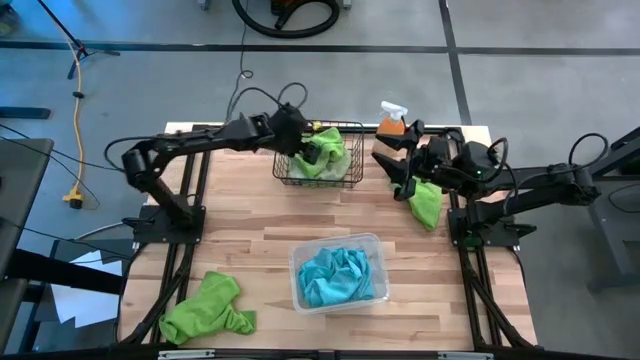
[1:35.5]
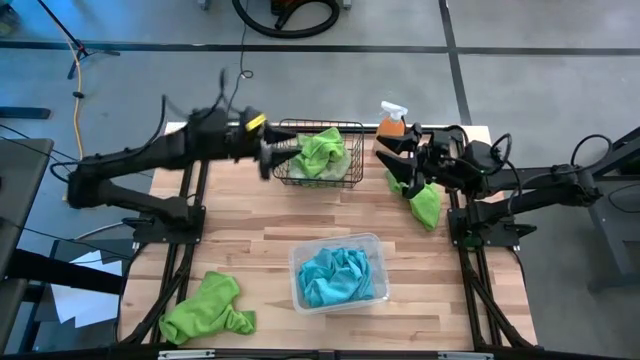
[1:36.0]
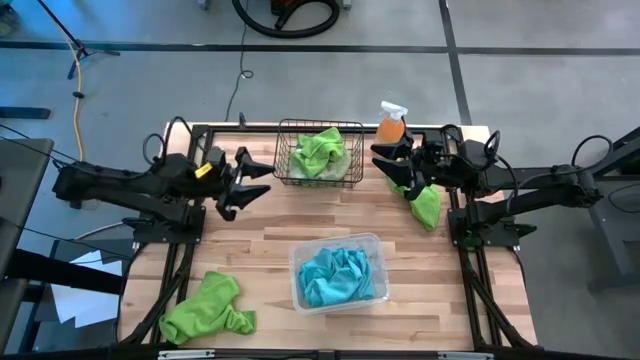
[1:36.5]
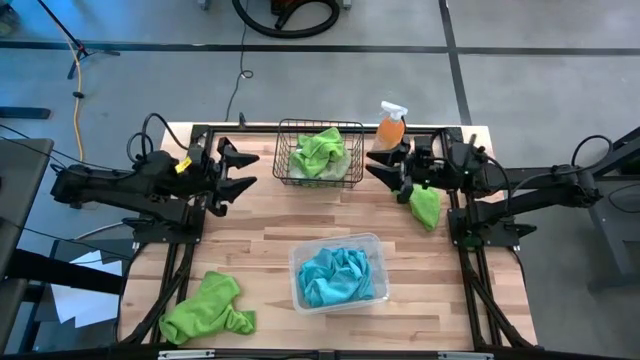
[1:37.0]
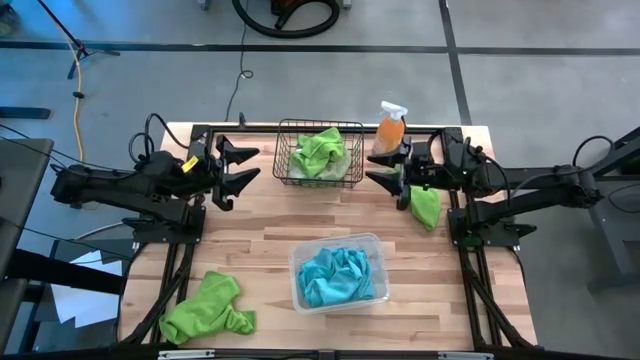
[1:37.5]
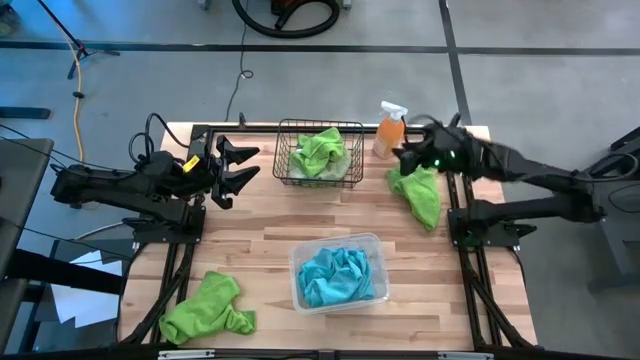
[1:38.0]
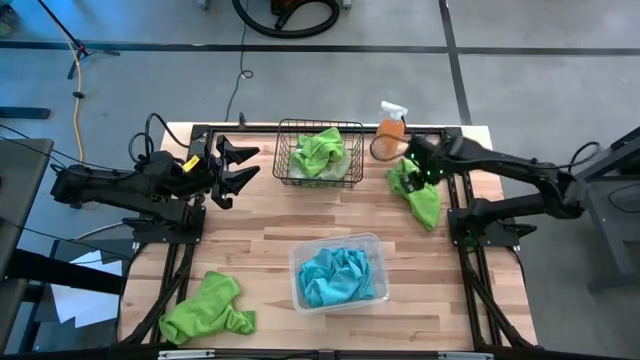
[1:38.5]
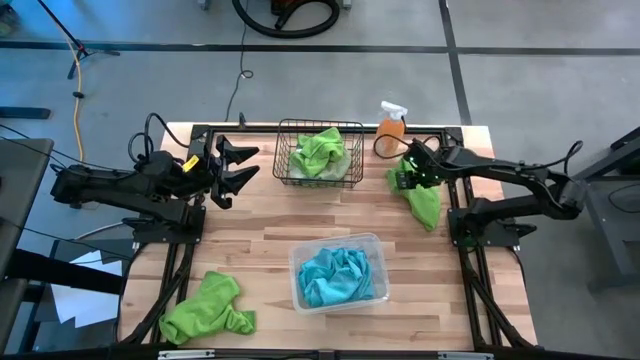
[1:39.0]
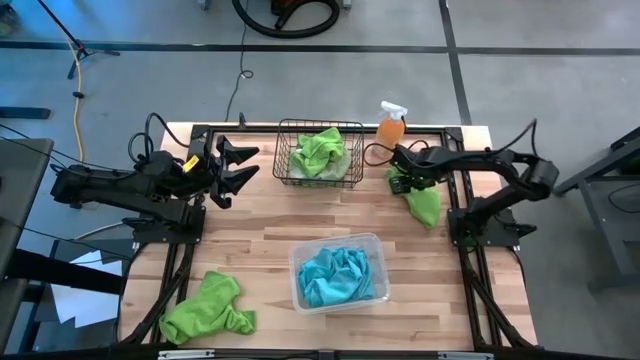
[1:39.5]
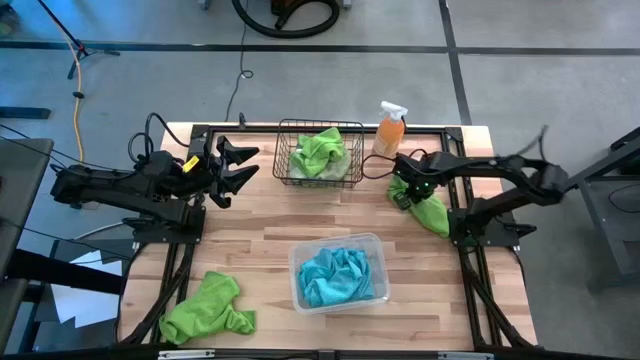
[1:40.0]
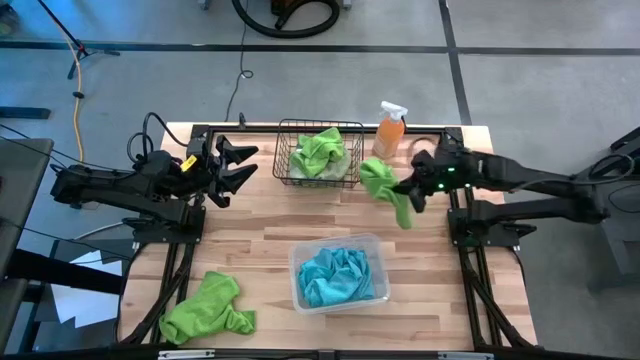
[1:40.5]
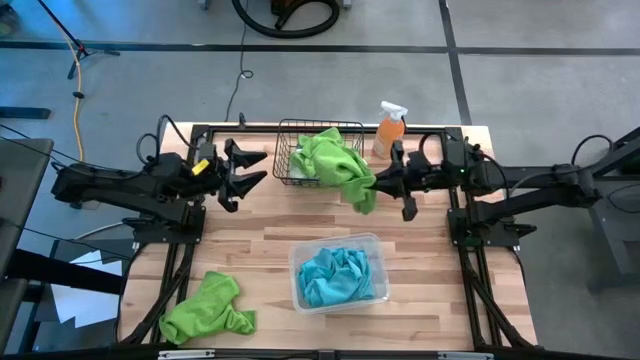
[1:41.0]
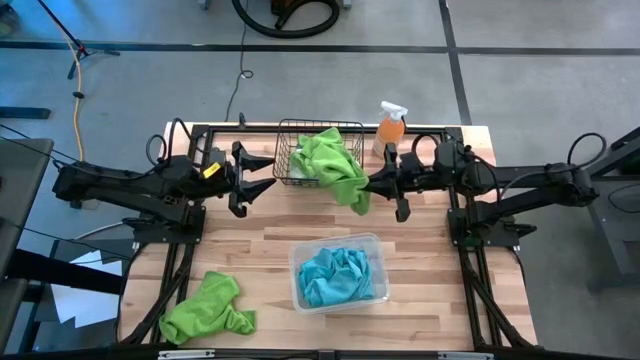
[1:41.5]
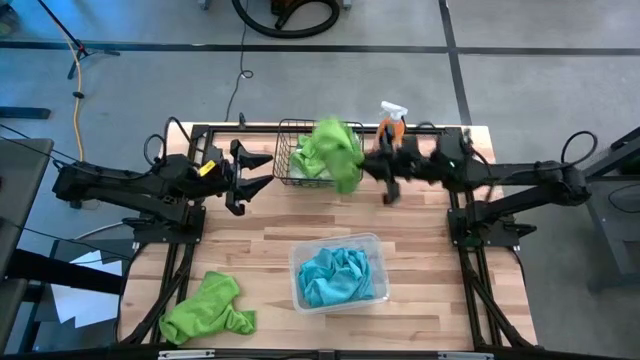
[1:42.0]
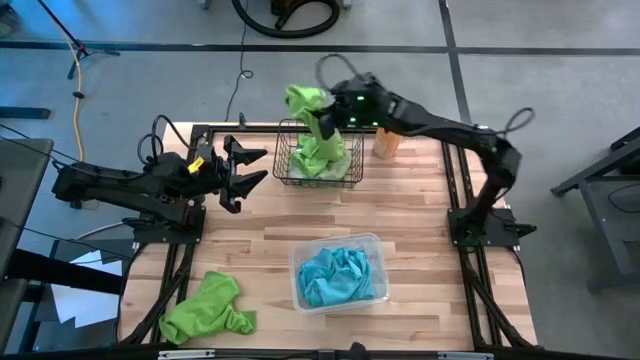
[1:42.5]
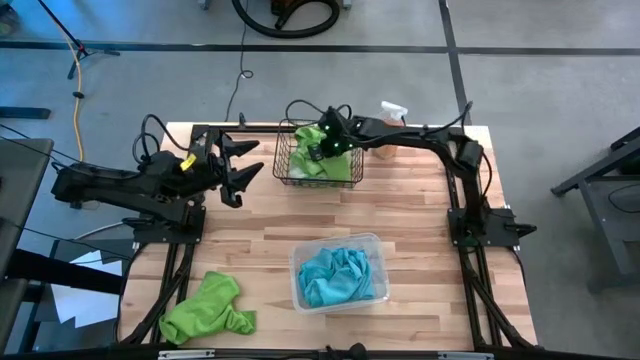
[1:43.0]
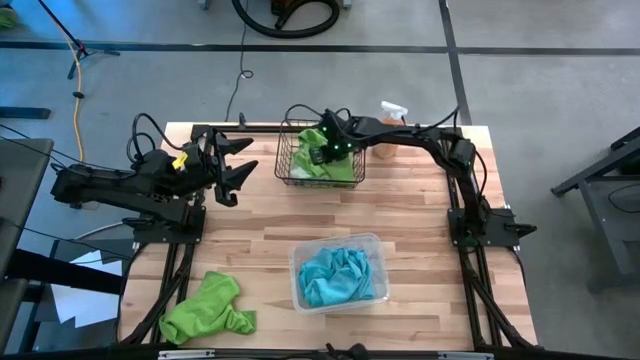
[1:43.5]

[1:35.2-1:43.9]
Task: Sort microfiber towel by color & place in baskets
Put the top green towel into the wire basket

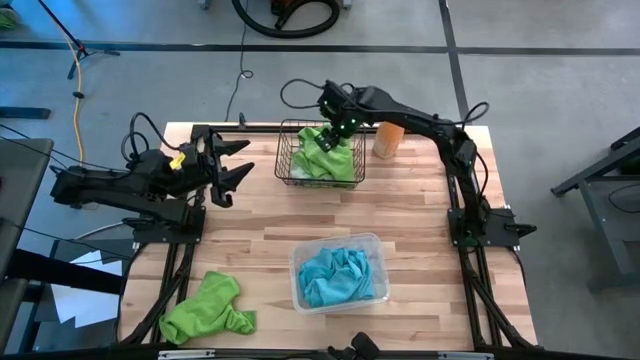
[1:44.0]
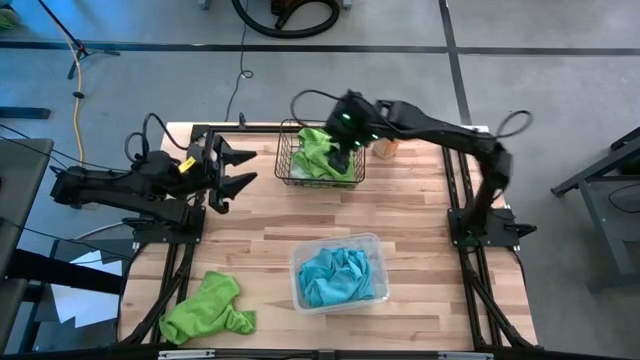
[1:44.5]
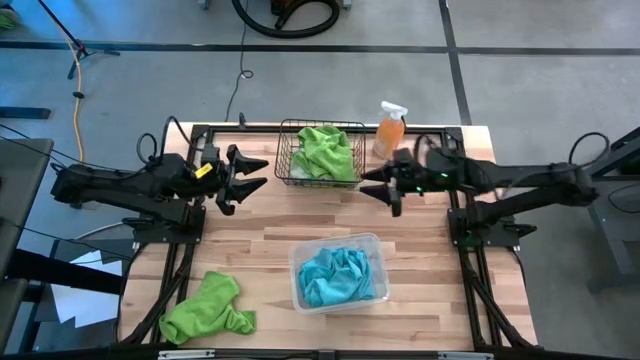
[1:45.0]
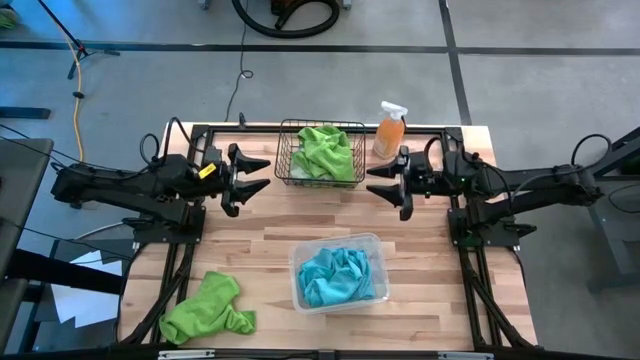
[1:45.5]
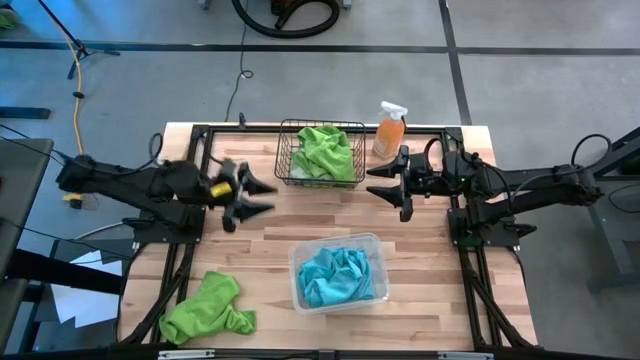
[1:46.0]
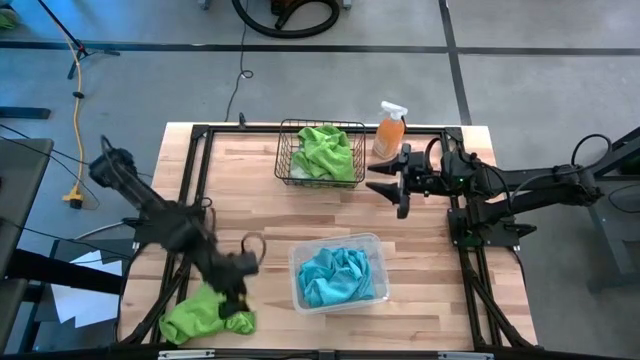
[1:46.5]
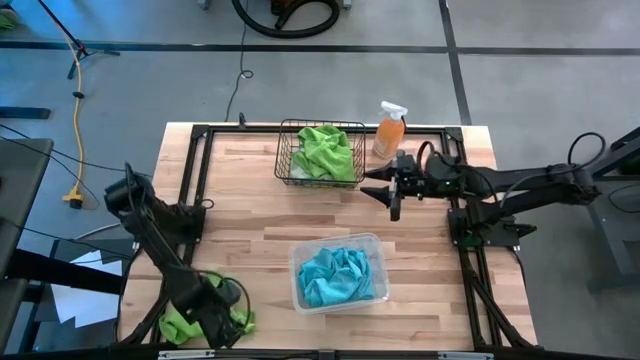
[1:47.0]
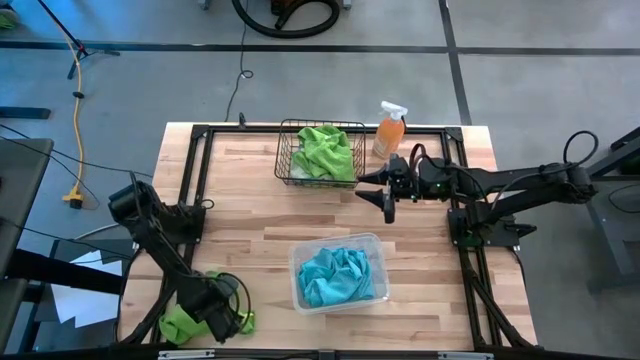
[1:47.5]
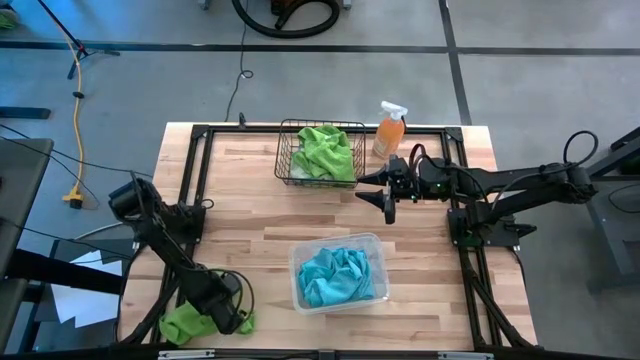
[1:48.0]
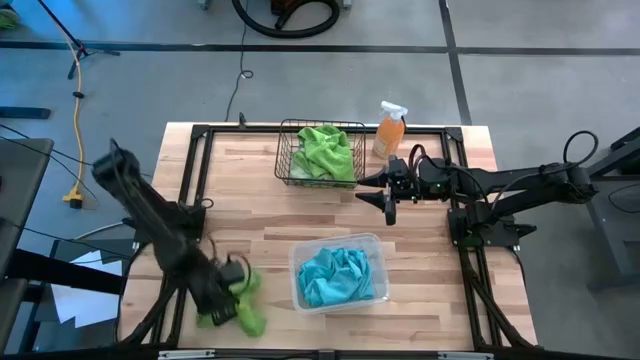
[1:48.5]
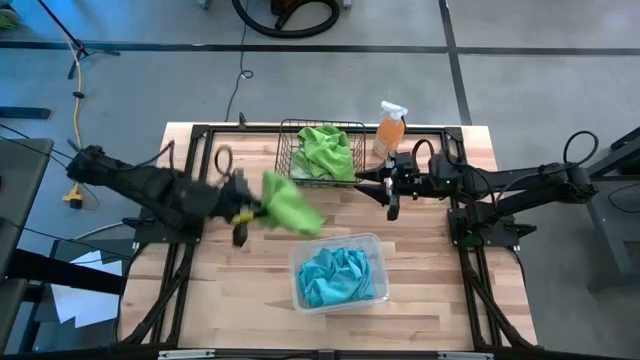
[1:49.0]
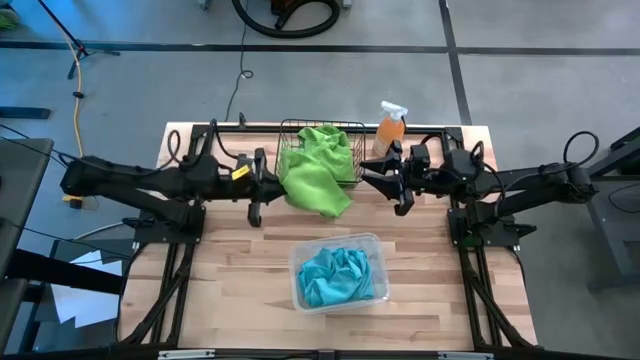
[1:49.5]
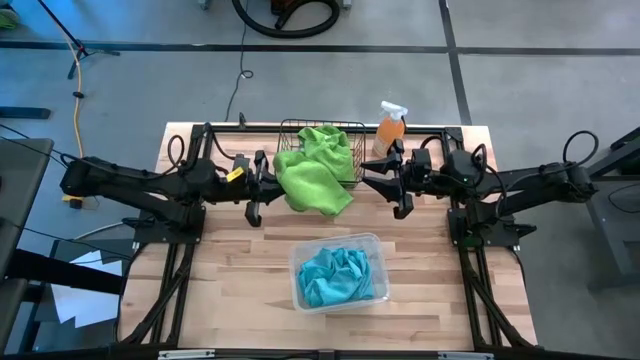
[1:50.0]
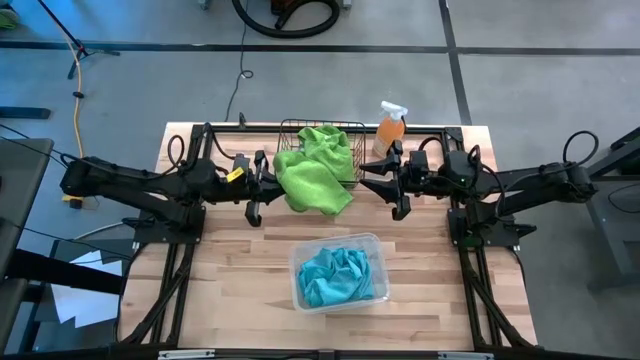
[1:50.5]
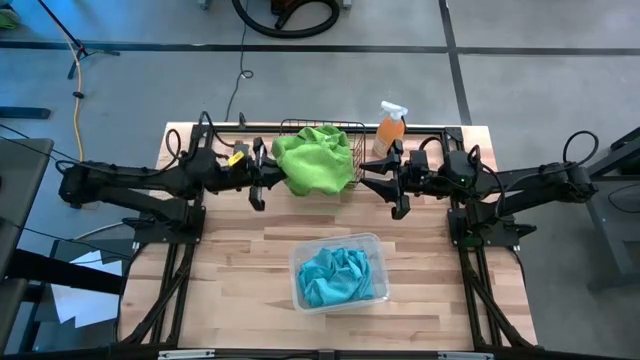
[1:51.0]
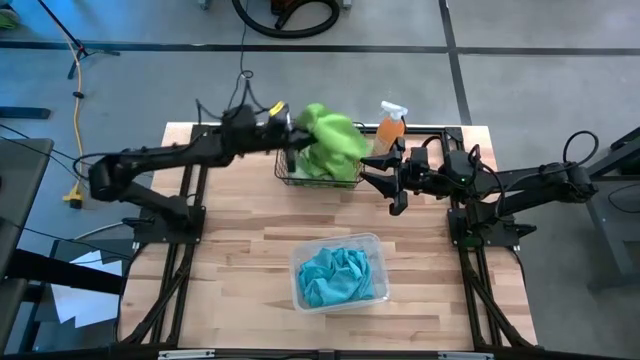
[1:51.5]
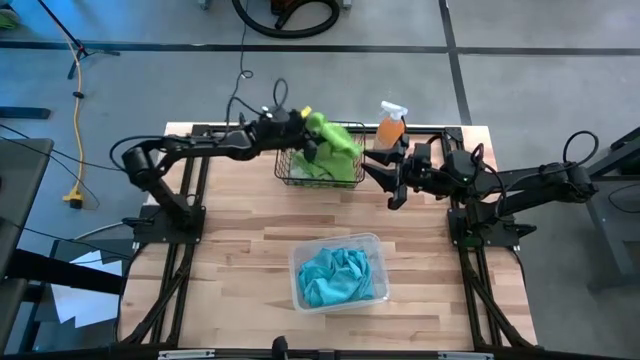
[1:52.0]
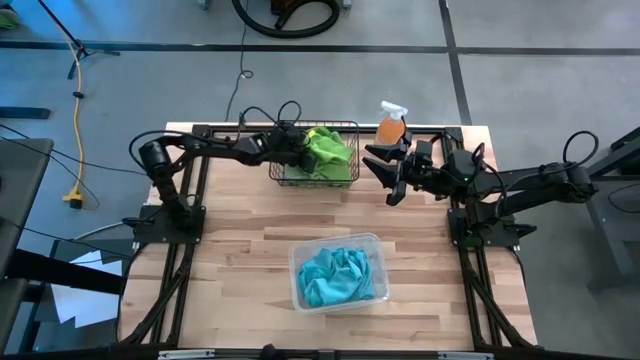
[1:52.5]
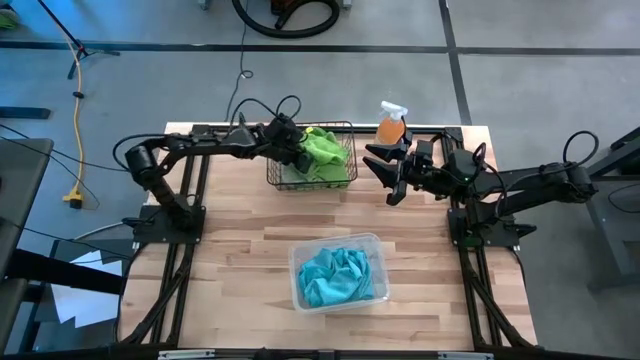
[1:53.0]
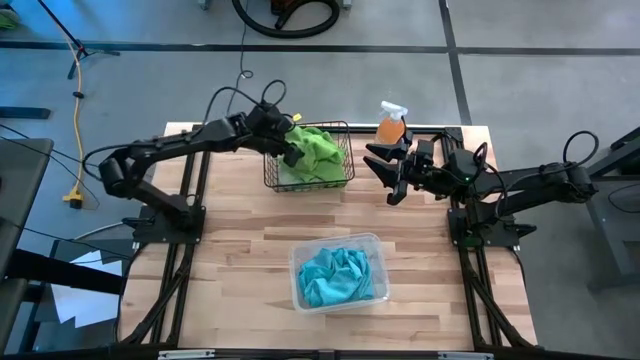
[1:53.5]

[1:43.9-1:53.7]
Put the green towel into the wire basket

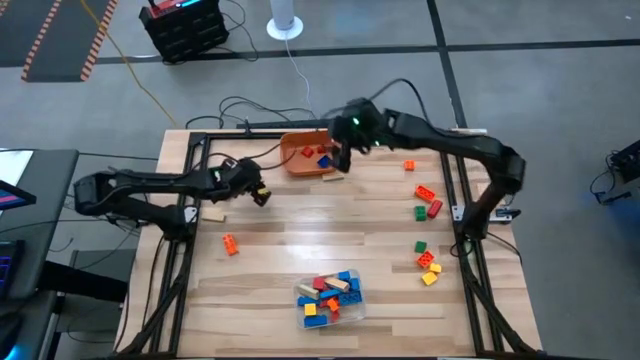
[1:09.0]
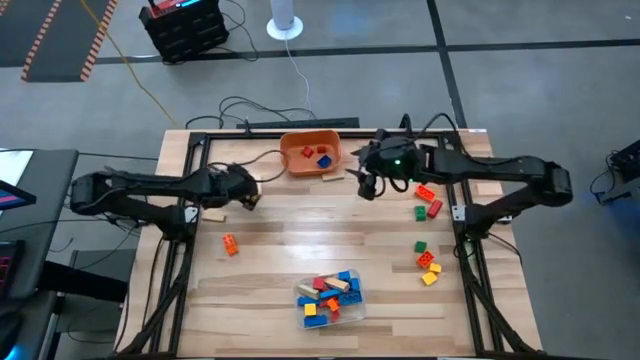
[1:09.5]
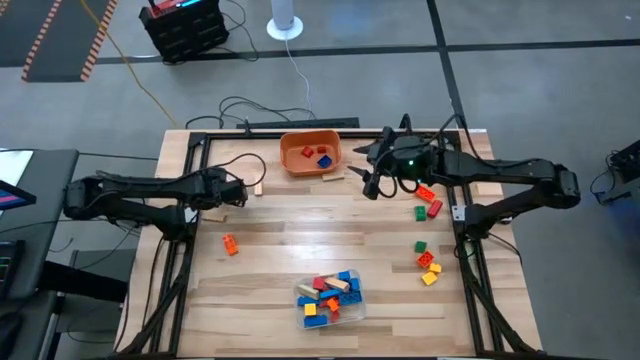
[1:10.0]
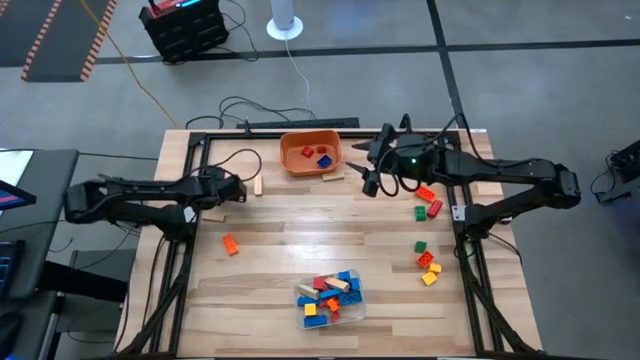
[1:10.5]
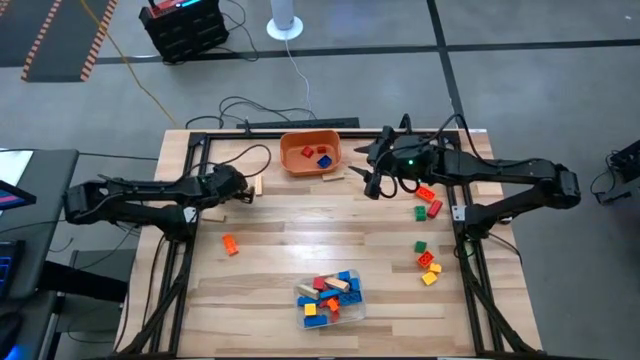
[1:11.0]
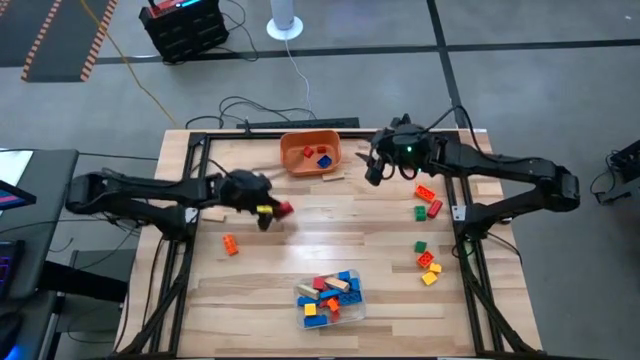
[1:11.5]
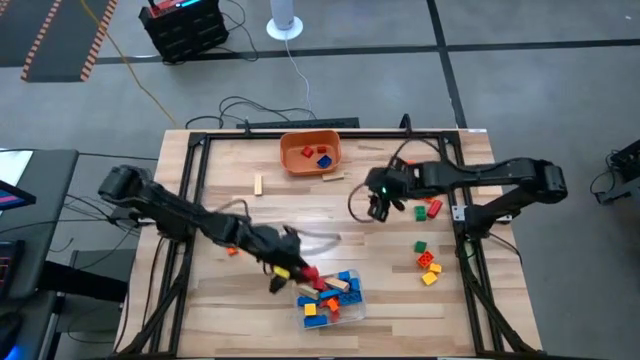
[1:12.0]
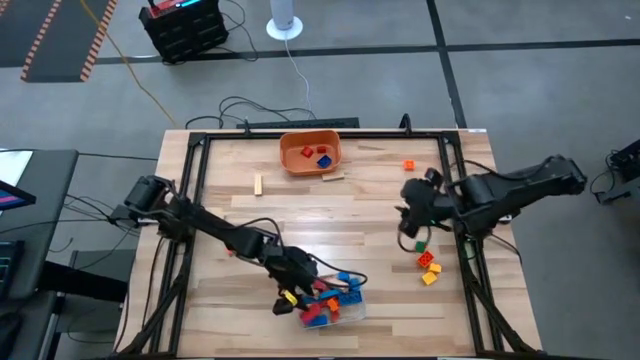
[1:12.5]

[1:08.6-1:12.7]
Task: Sort blocks by size
Put the large red wooden block into the transparent bin
